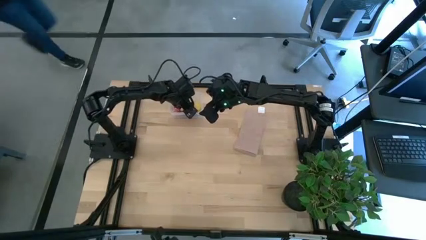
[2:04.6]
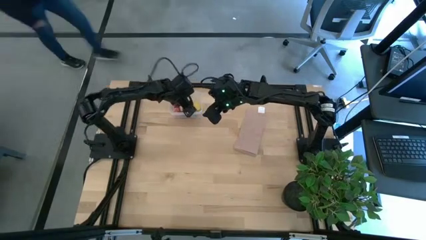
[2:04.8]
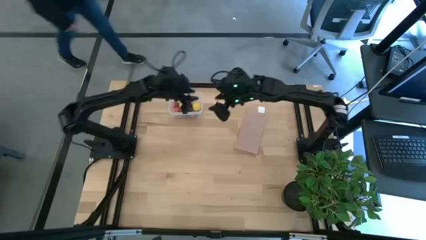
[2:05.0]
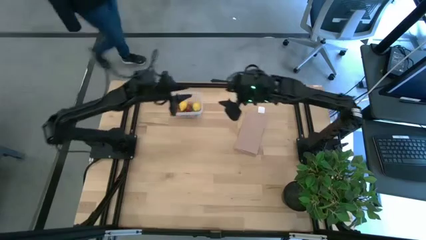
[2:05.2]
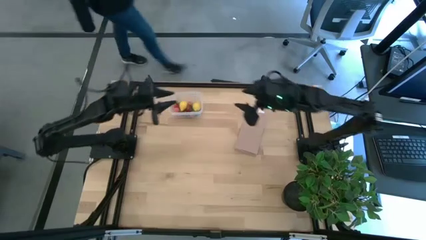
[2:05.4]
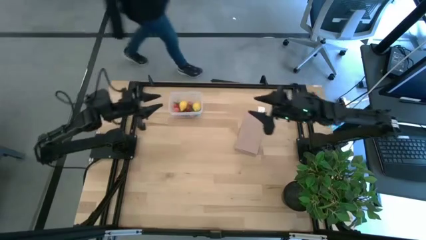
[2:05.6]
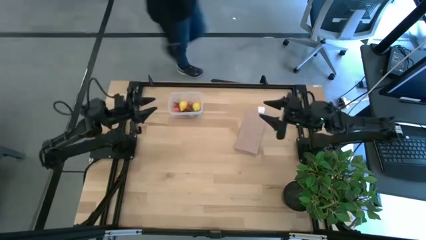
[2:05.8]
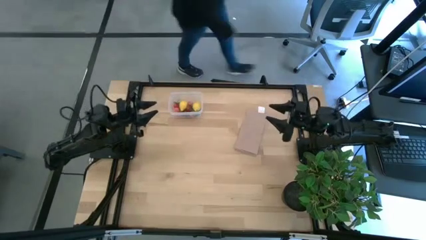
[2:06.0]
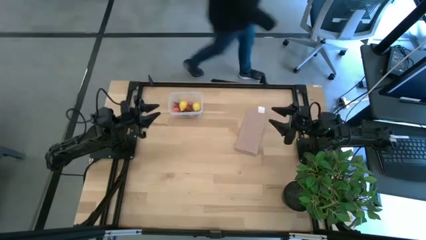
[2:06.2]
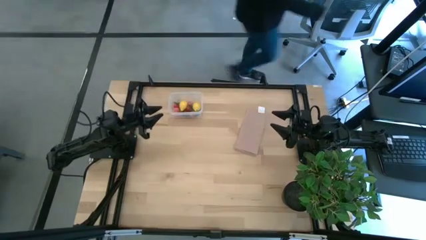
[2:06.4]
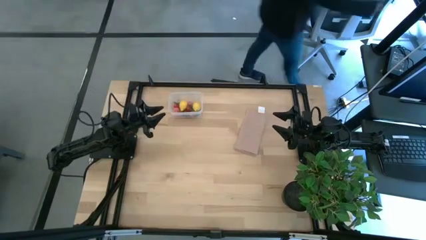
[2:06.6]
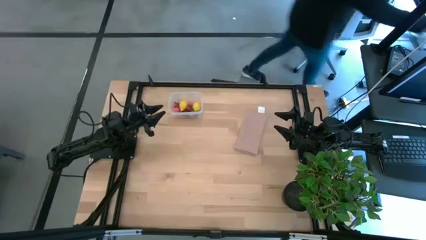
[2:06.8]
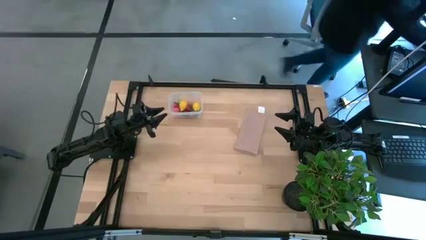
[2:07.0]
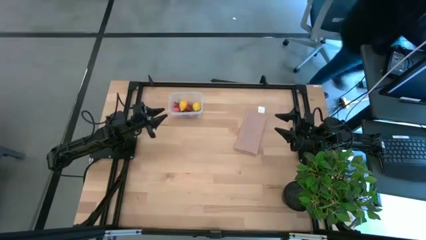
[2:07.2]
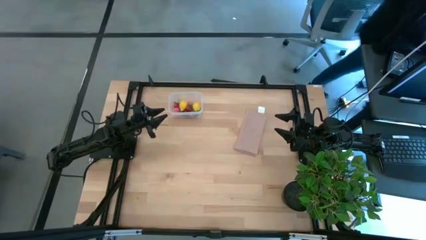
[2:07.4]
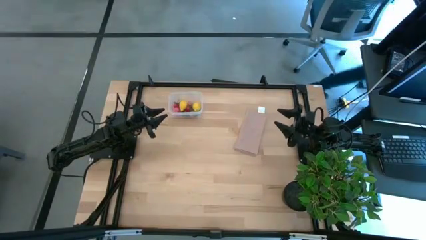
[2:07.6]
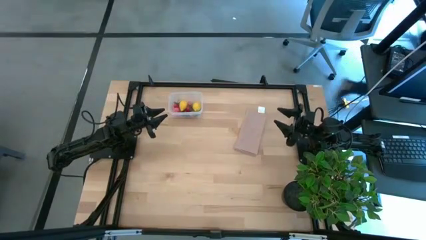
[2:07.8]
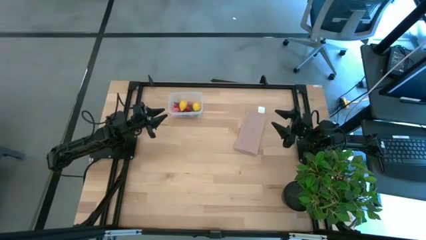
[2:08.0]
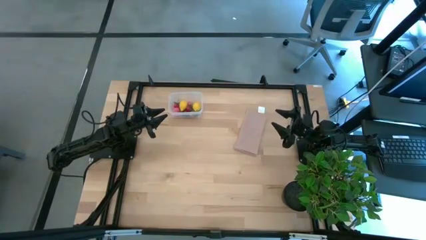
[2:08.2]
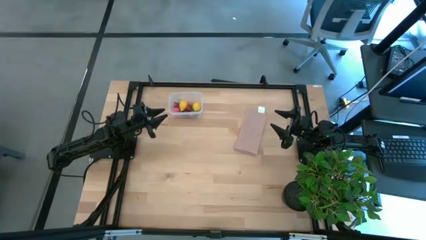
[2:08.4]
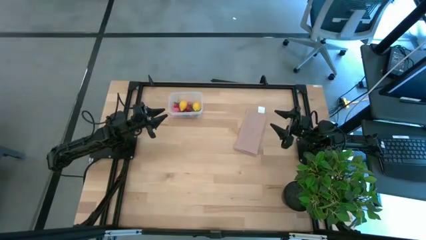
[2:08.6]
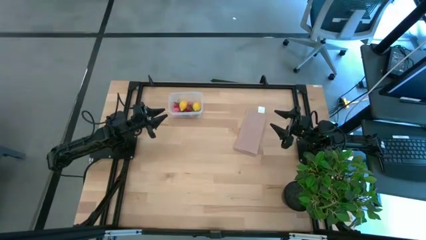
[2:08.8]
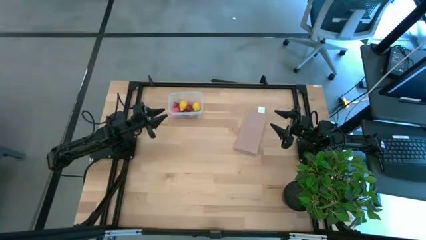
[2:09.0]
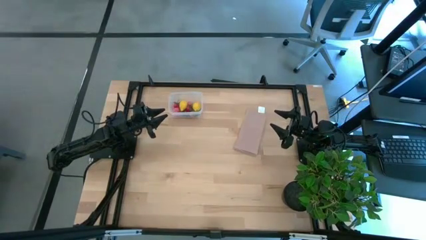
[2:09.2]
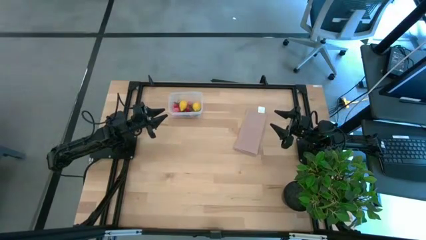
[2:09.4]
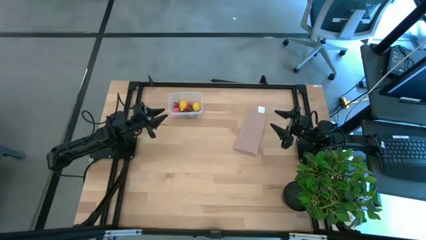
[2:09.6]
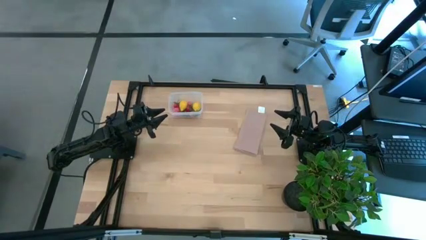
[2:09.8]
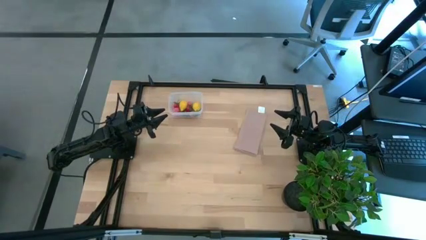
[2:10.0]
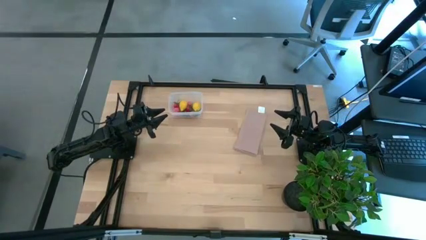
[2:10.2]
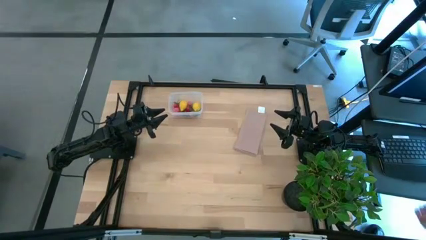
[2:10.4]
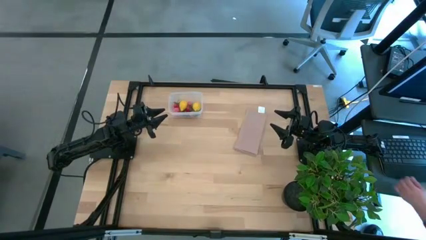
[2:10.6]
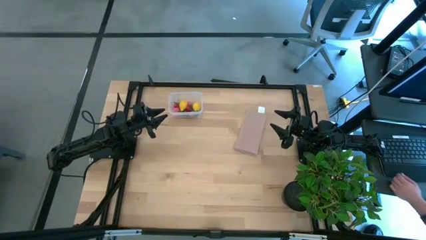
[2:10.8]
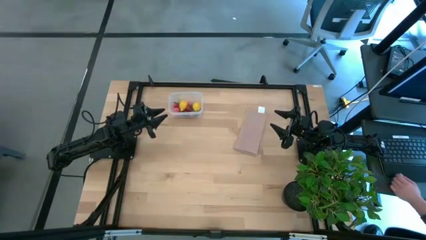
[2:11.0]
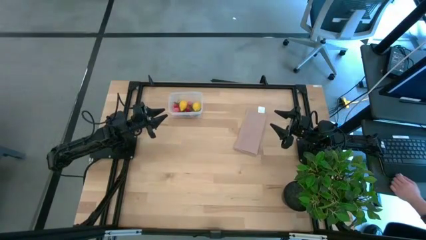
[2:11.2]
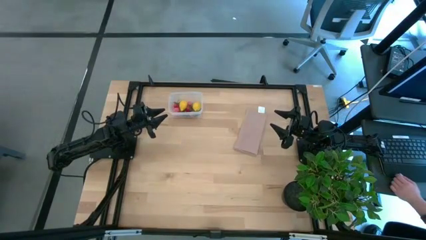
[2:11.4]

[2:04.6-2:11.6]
Task: Pick and placing Produce into tupperware
Return to Home Position

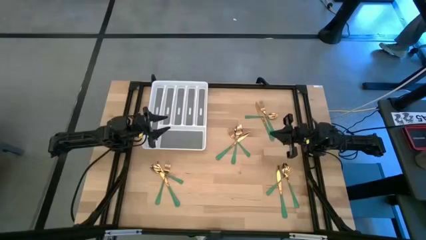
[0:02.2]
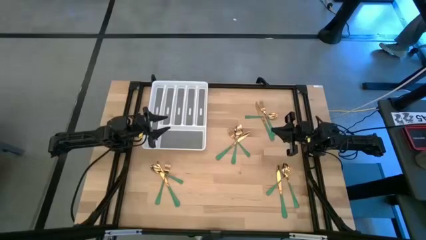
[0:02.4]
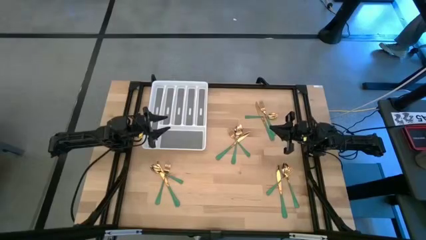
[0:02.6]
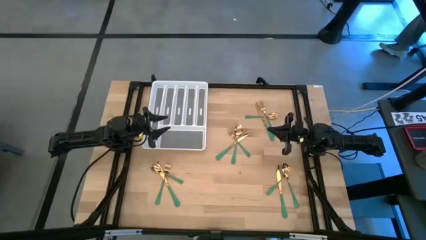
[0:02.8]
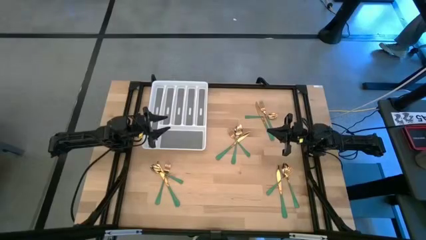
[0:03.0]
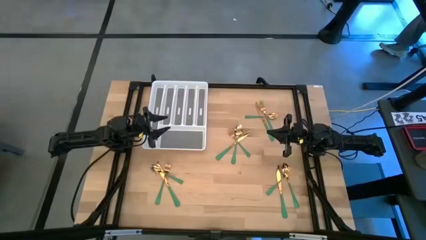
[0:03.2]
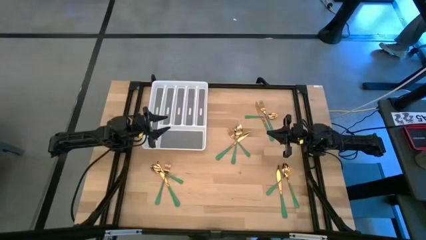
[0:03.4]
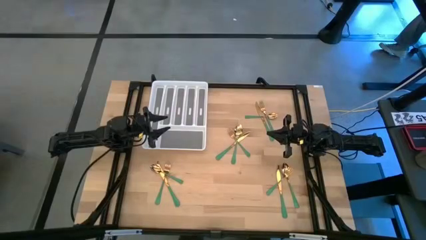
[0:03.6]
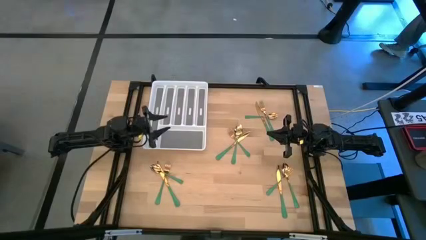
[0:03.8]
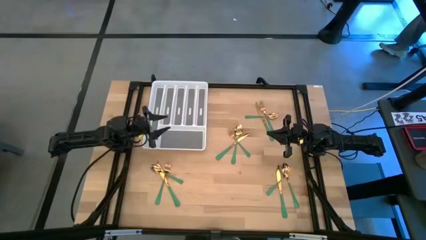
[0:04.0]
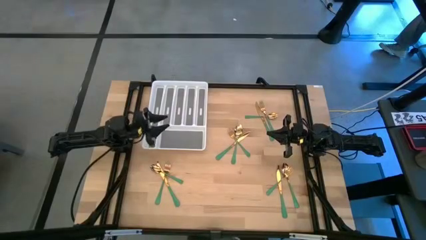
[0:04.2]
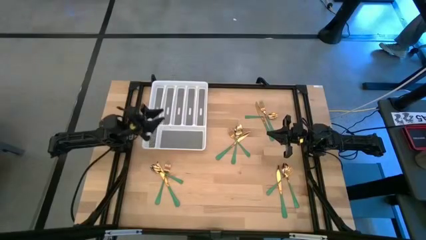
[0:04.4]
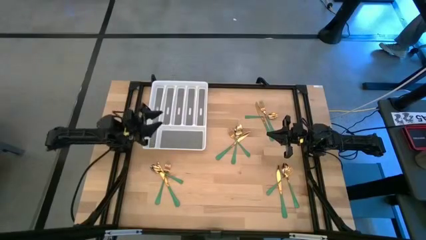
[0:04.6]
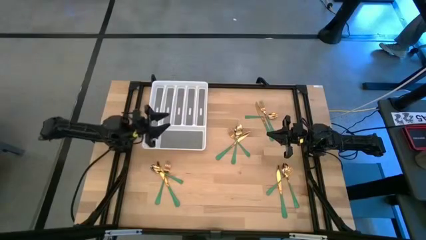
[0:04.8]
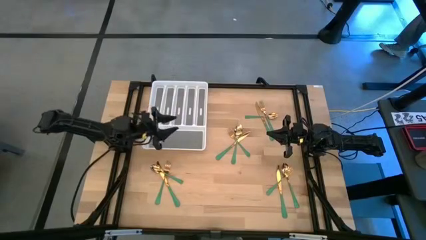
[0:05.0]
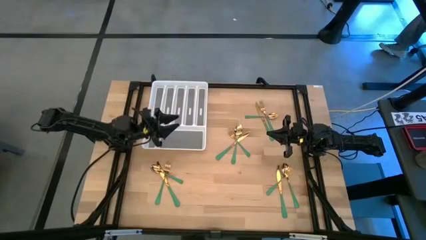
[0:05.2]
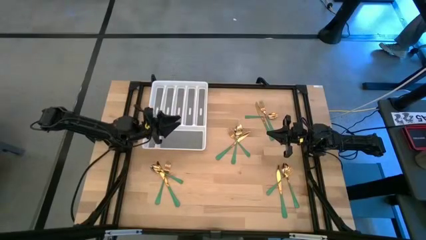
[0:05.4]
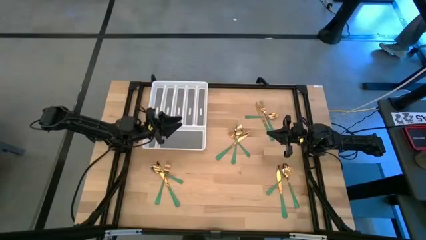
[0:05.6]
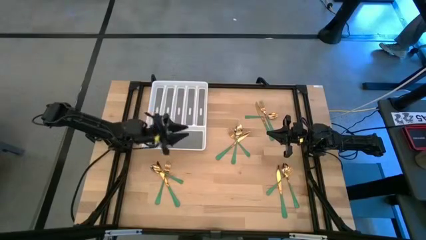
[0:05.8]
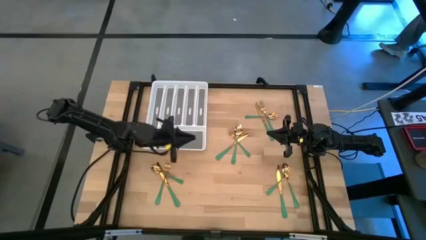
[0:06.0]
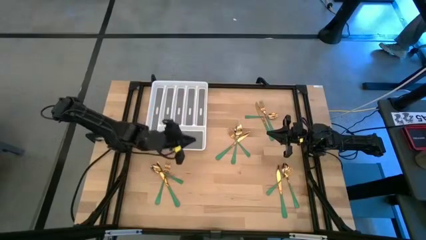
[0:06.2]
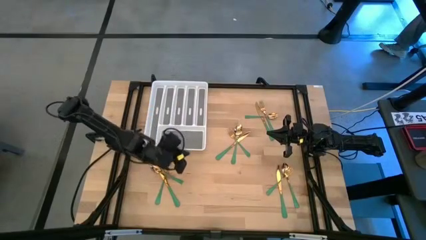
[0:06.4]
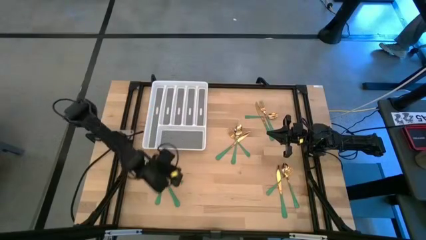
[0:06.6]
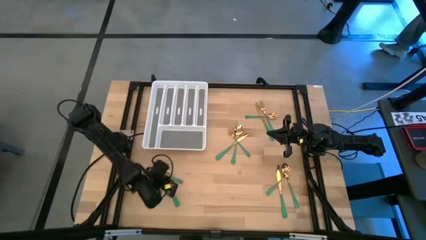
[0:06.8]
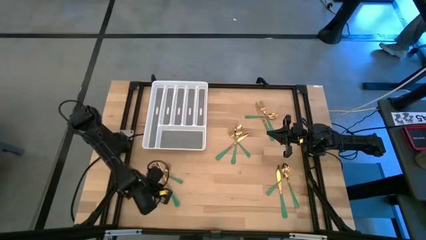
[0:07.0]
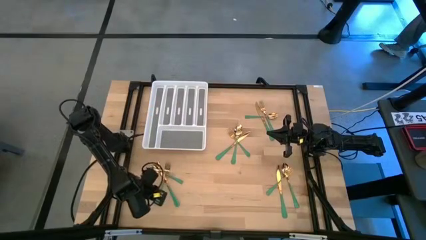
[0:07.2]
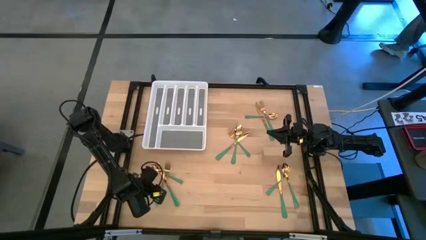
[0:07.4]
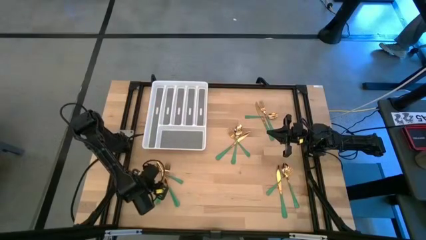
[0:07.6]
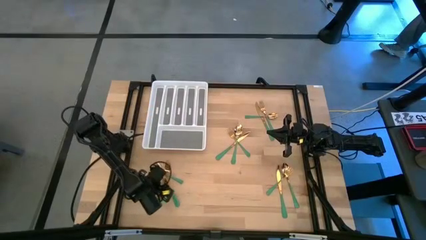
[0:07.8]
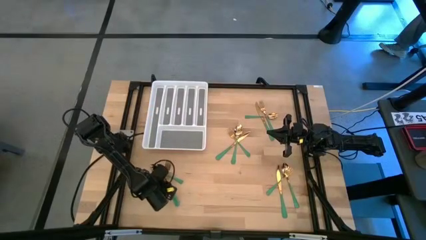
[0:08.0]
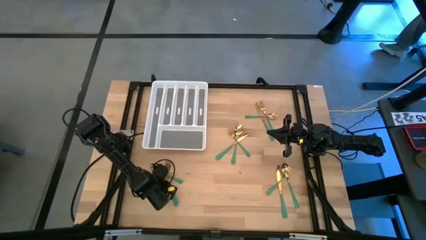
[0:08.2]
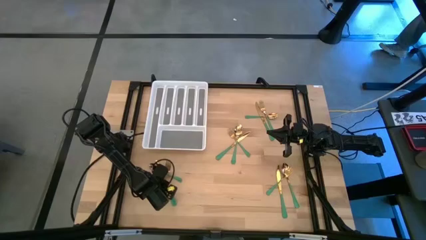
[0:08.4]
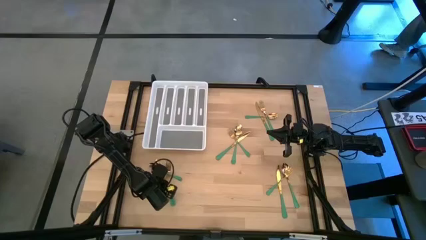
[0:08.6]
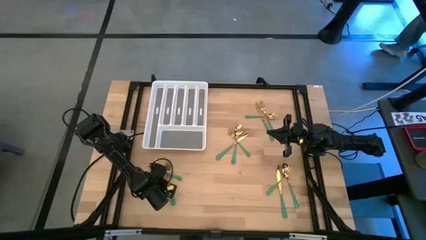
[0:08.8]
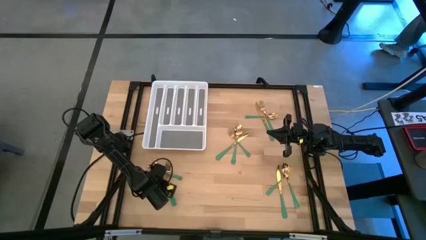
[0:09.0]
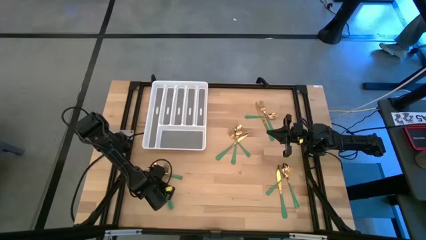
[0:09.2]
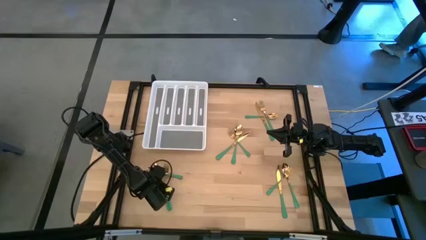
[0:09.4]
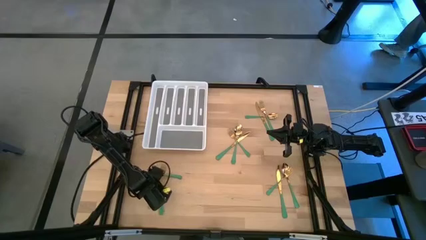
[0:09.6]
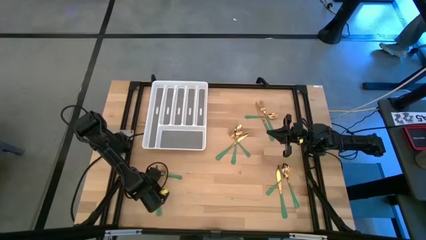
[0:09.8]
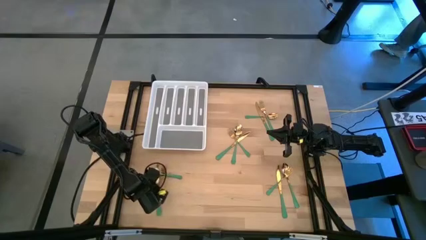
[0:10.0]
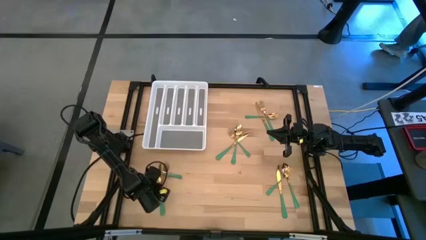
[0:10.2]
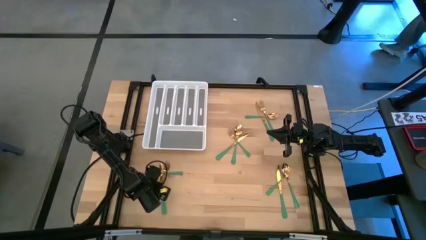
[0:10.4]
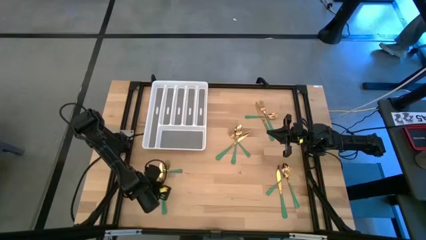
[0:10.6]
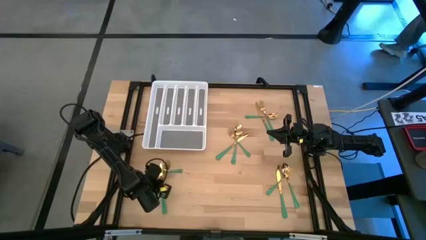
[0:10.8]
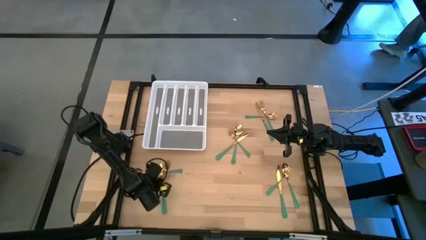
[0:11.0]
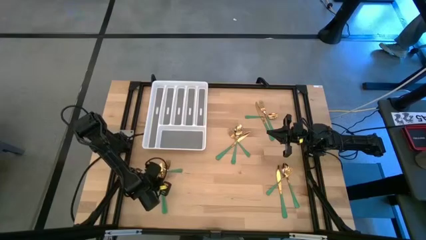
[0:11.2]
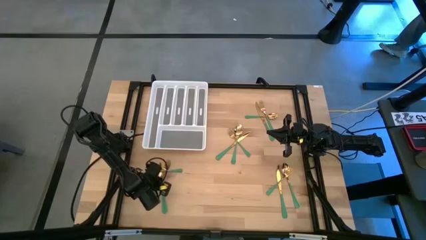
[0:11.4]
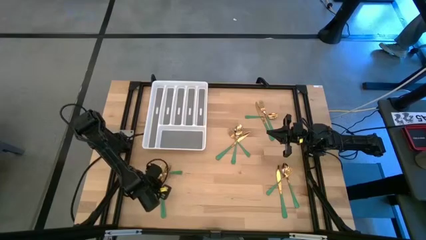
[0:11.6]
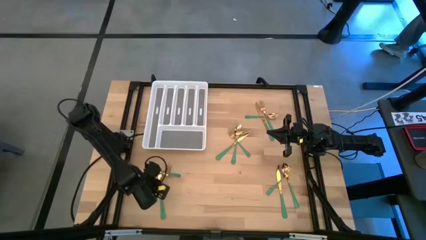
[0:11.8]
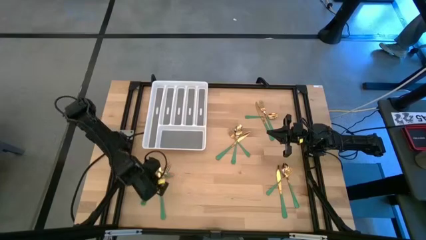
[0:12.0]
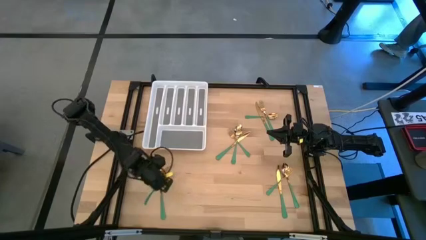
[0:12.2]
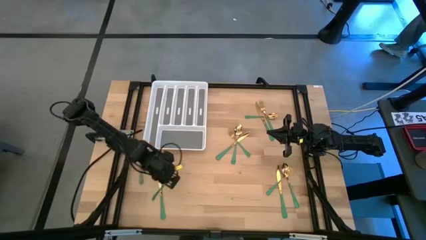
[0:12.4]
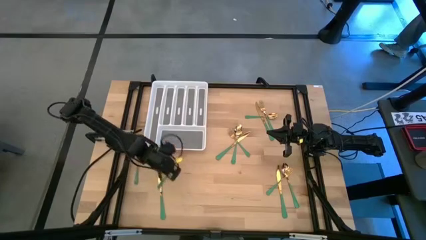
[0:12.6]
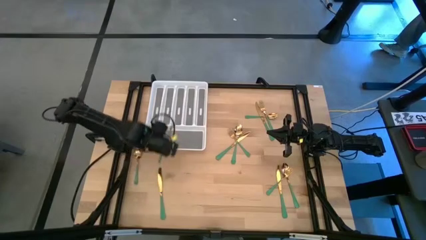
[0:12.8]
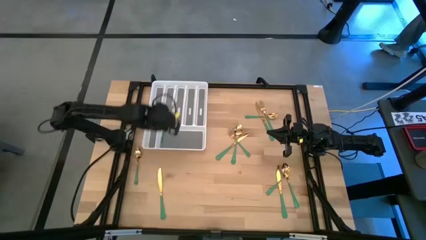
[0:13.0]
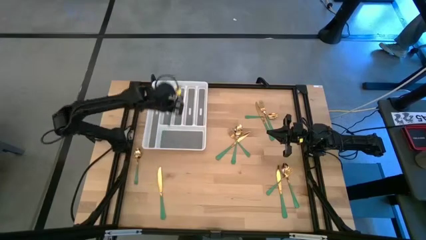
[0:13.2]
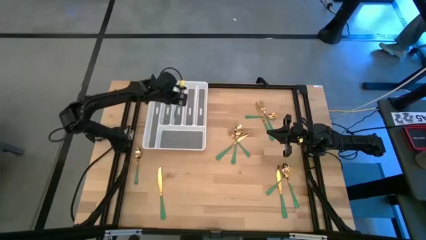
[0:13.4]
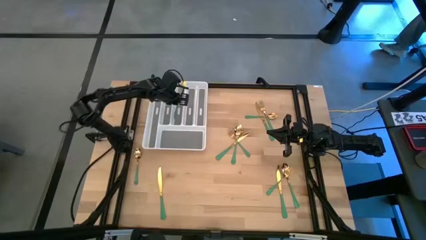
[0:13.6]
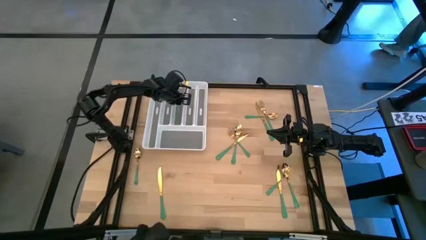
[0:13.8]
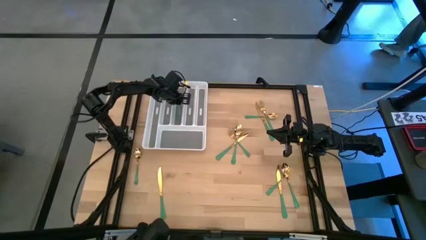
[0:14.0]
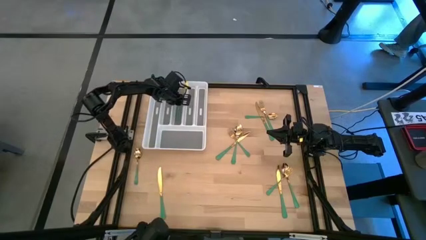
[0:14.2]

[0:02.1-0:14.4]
Task: Sort silverware
Put the green fork into the white cutlery tray
